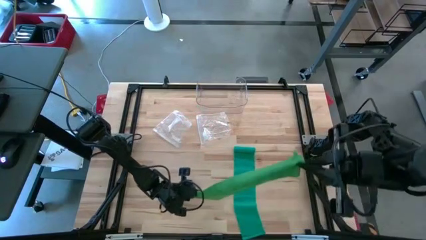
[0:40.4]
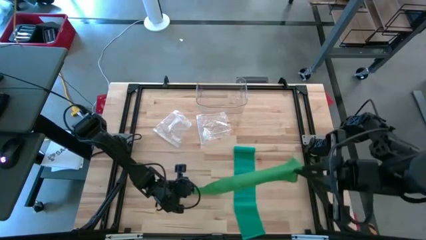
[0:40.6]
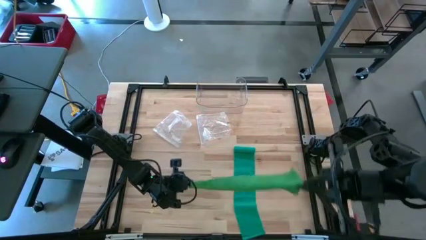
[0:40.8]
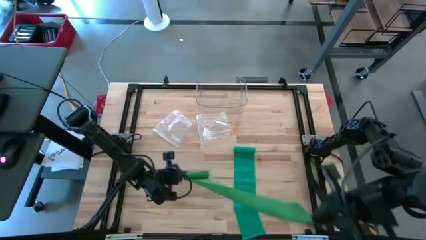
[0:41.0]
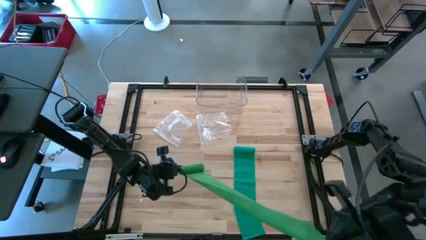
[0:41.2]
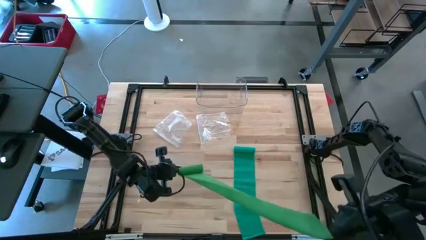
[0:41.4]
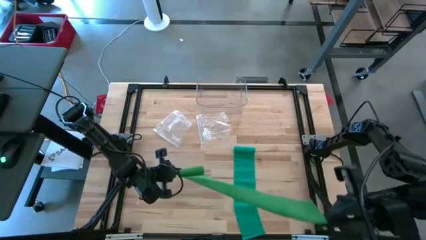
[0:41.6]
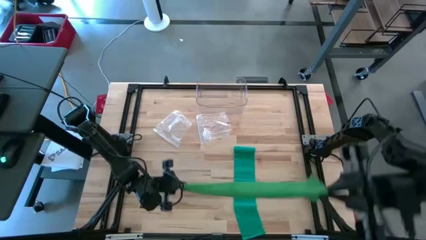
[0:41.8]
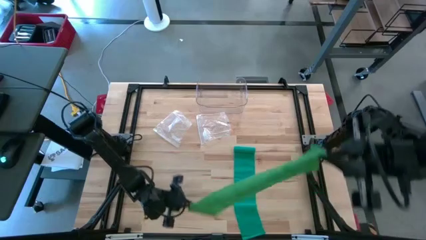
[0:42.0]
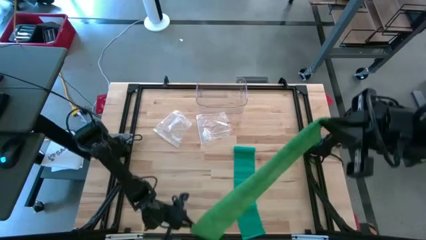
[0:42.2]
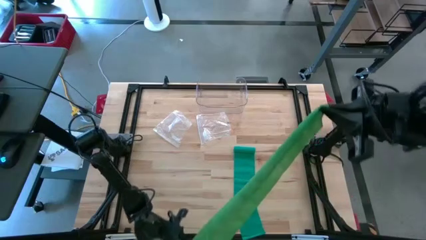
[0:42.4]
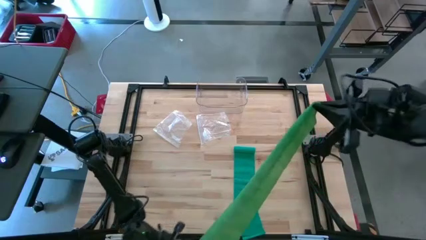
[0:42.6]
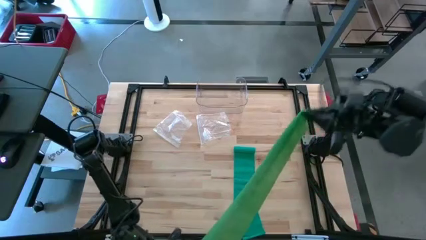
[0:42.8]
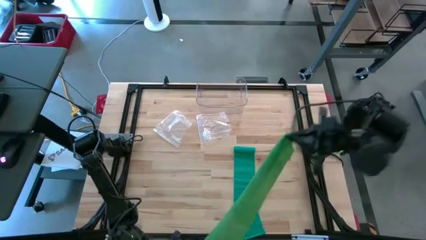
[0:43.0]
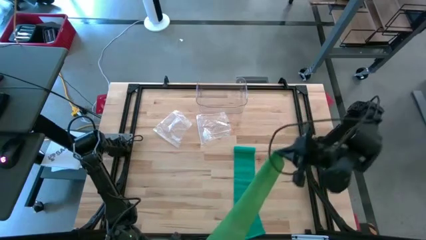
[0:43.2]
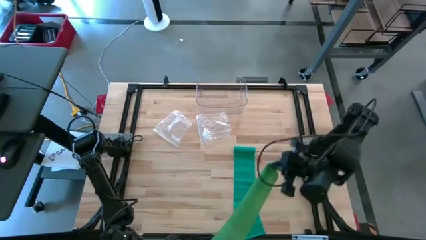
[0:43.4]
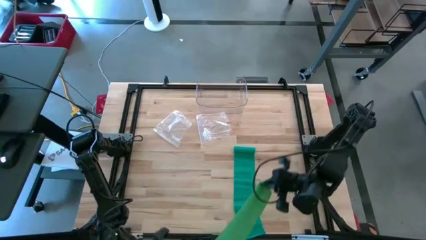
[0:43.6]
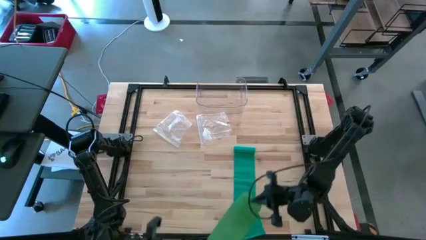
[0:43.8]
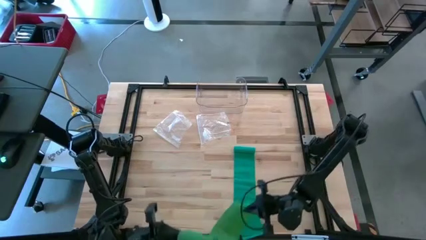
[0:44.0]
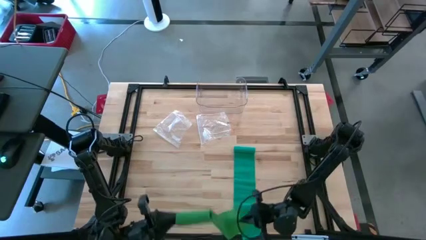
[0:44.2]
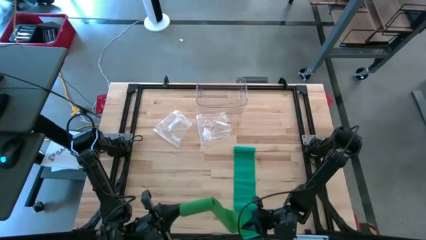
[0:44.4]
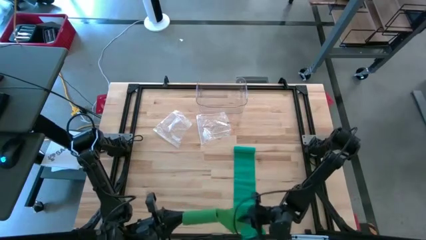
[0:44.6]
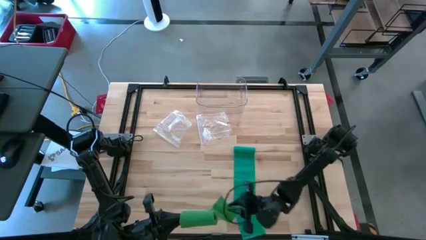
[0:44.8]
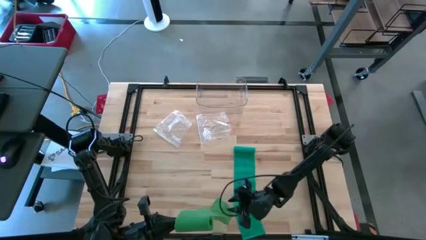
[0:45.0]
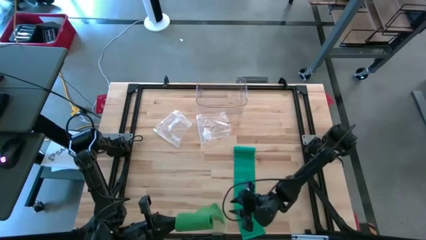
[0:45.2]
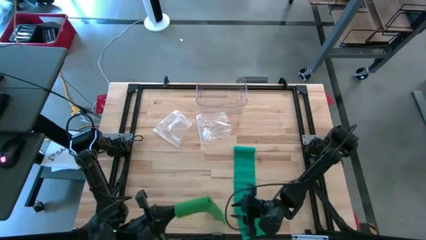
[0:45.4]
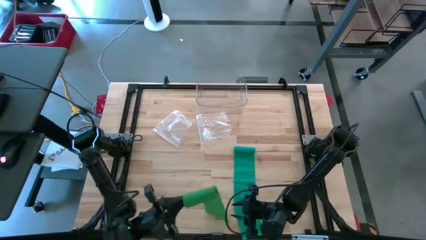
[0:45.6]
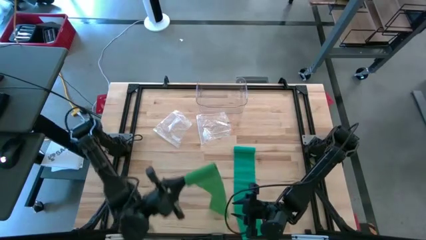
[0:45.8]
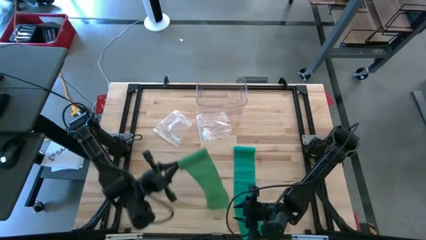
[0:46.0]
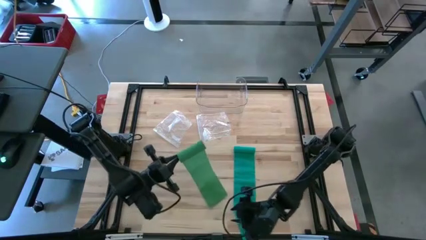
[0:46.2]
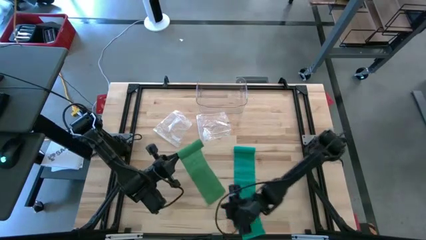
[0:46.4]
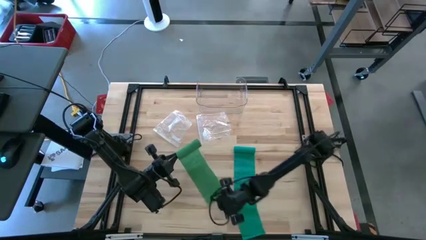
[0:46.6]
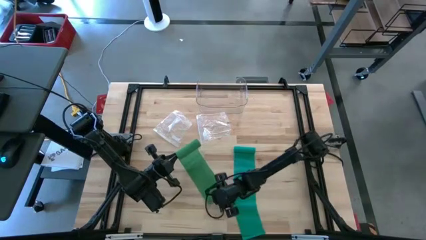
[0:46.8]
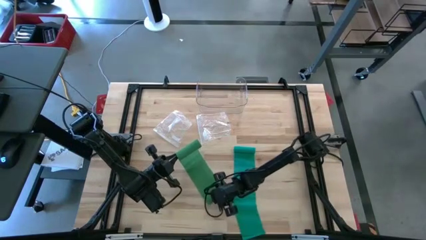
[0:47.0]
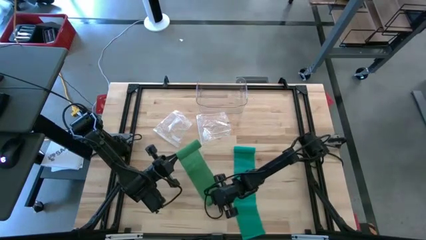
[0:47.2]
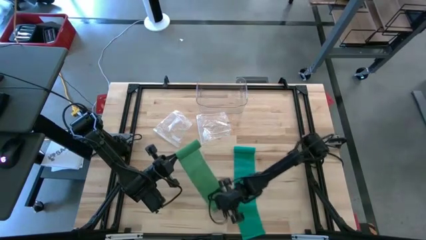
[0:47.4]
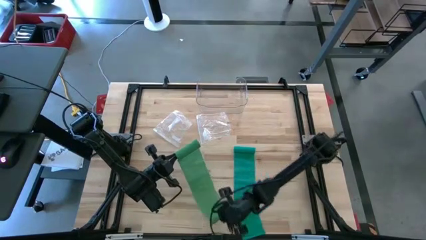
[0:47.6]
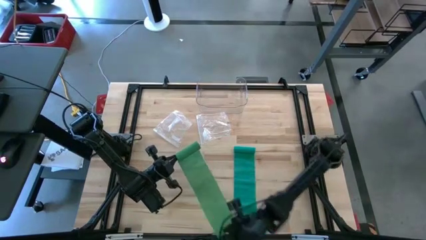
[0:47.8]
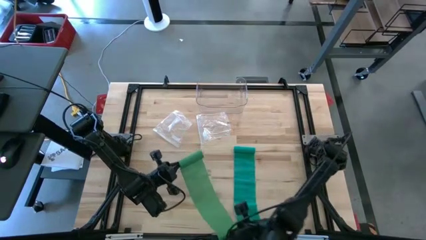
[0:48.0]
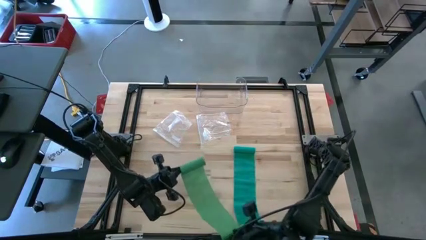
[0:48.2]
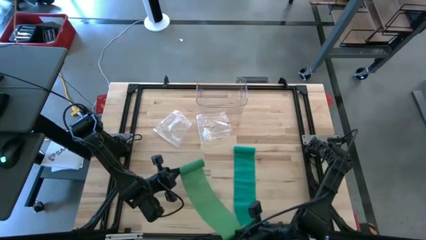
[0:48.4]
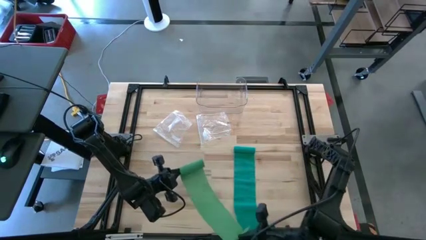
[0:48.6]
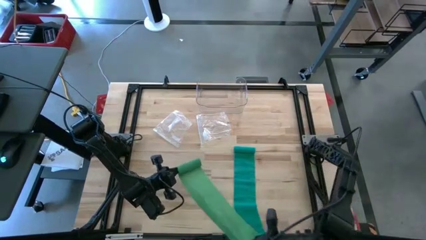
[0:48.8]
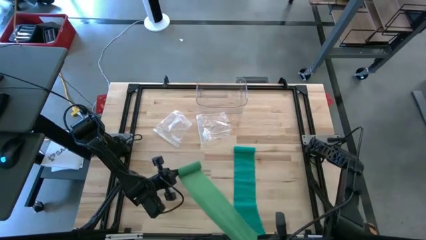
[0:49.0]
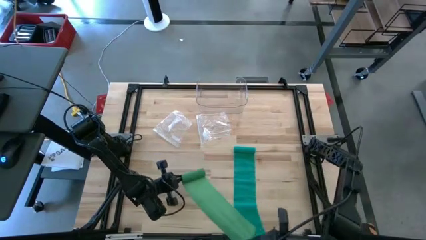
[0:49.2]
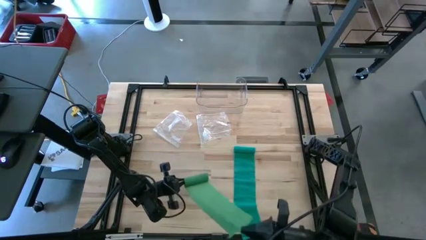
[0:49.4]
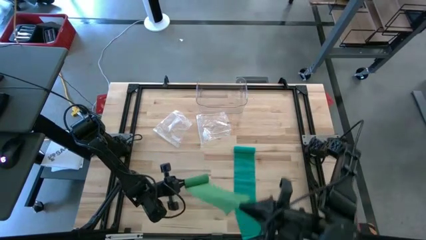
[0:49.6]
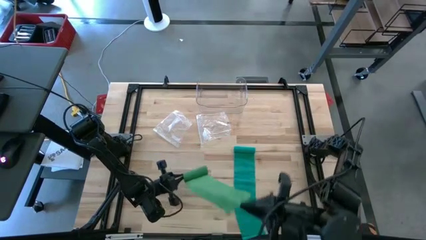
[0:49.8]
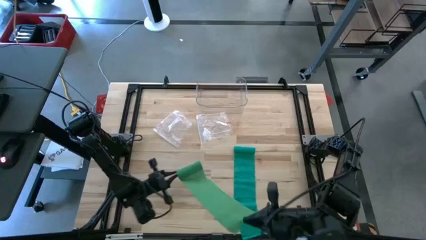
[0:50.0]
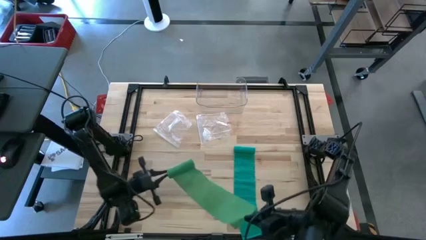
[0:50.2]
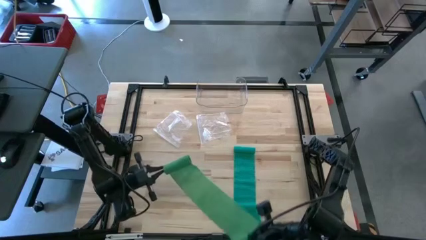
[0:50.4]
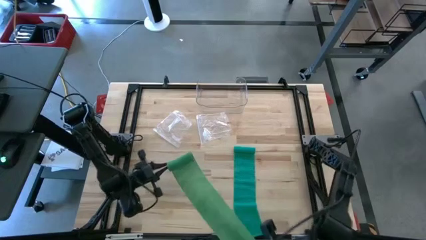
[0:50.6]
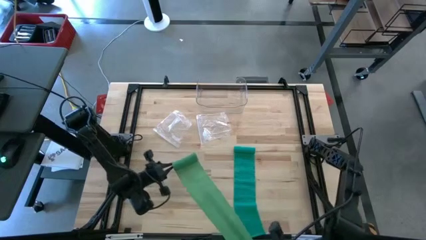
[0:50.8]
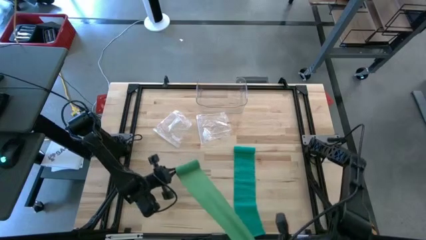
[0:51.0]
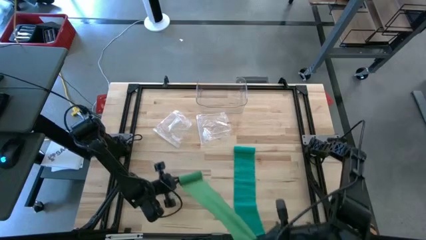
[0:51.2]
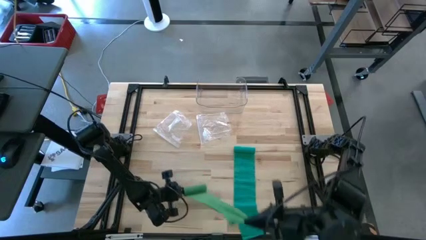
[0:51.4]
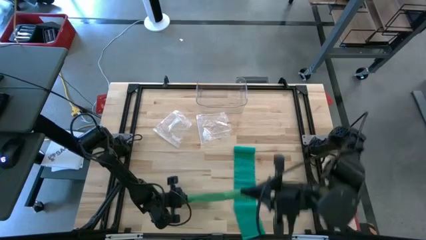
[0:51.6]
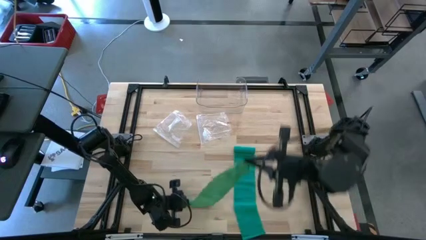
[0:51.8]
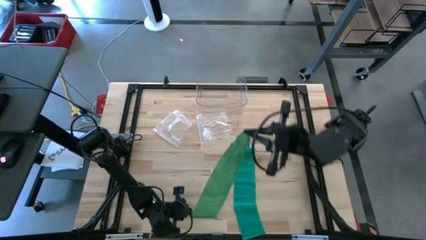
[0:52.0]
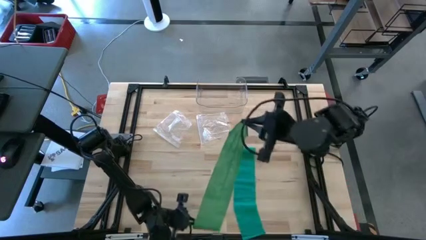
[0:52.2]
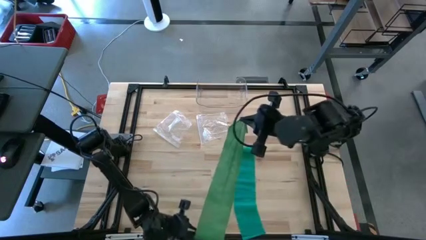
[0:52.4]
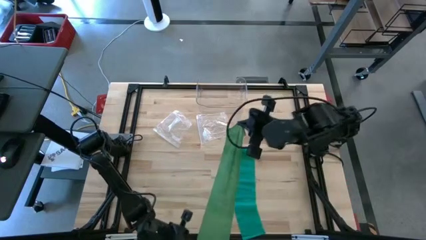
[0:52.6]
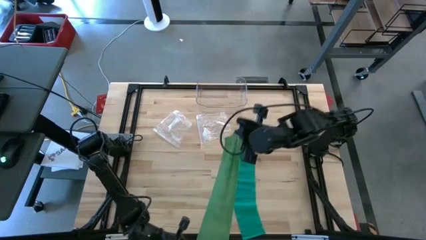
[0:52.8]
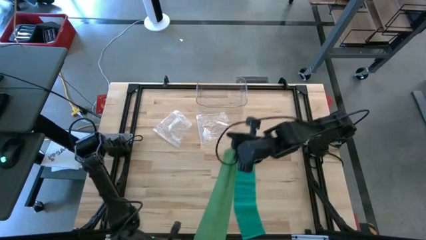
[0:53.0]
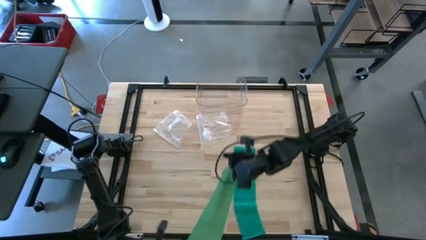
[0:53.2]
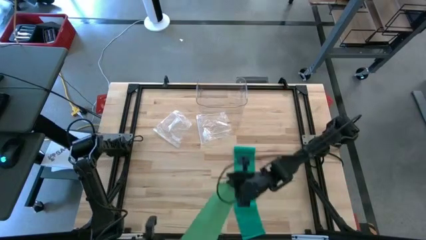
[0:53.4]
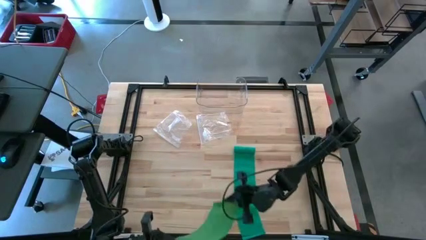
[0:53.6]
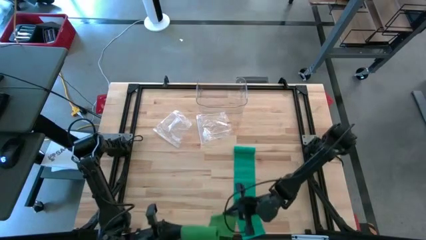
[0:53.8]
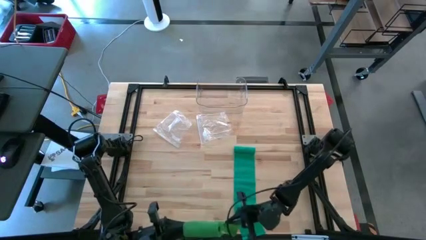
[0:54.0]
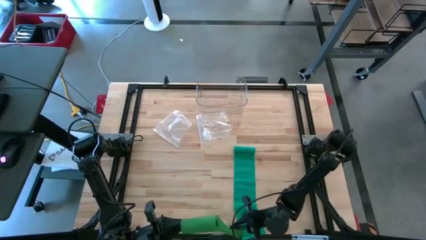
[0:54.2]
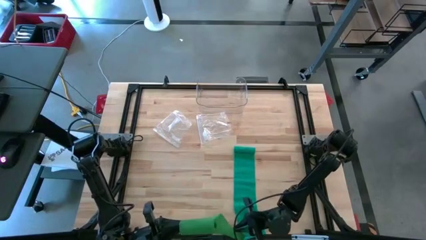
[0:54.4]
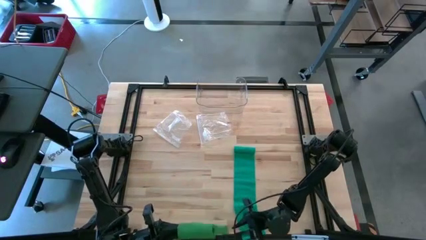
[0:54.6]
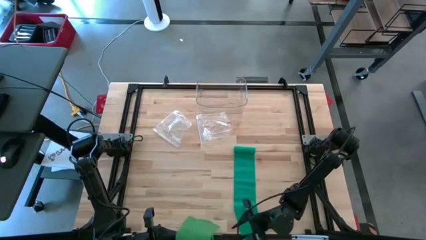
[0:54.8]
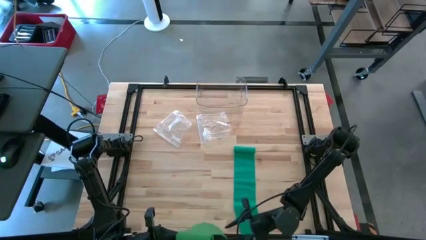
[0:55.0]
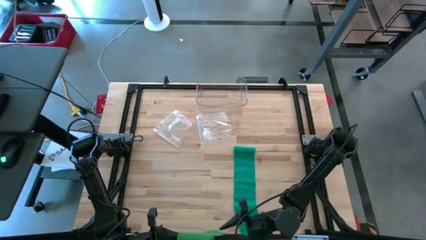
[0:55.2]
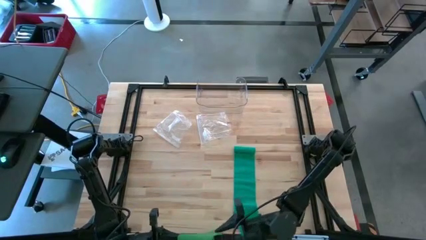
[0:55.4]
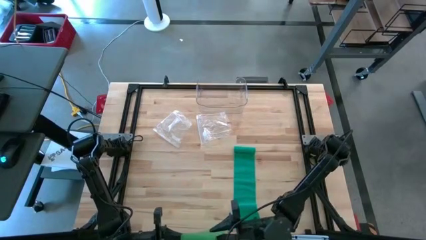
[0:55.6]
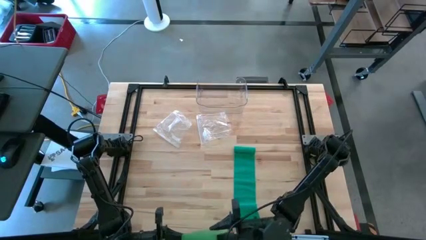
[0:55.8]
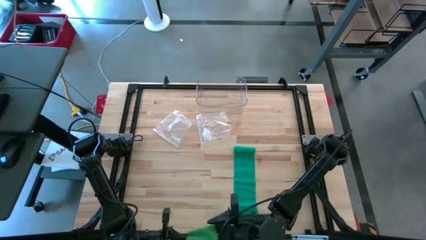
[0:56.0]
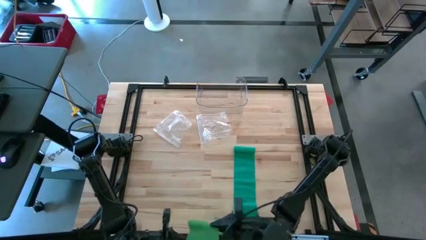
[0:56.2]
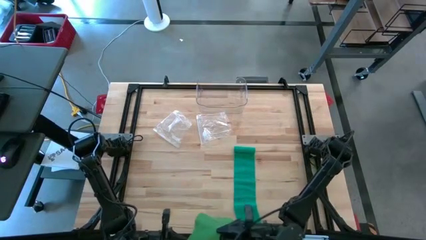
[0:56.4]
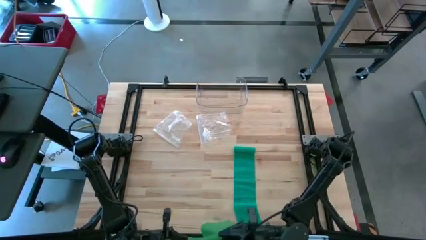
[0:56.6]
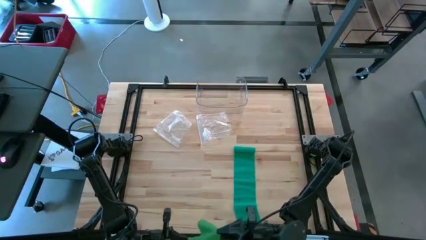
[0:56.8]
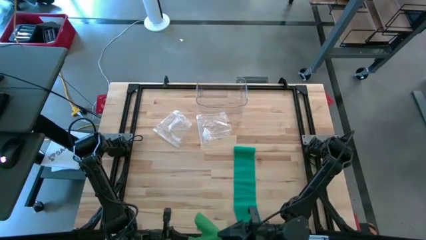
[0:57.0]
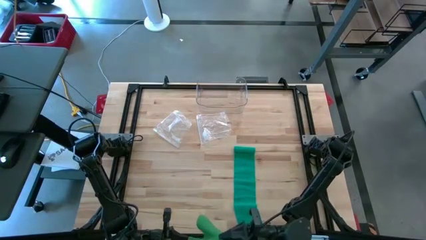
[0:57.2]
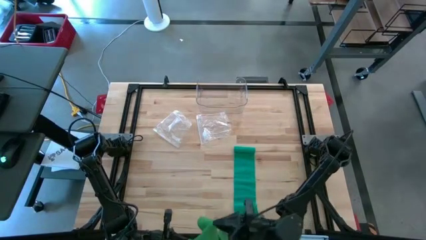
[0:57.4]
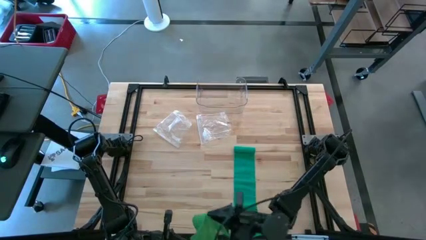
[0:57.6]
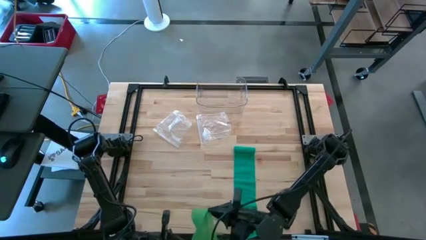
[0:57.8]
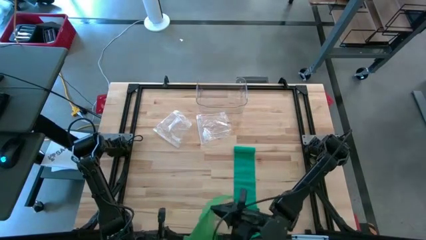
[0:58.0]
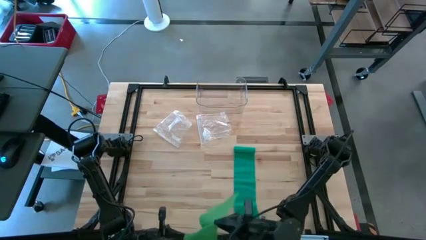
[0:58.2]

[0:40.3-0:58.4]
Task: Roll bandage
Roll the green bandage
